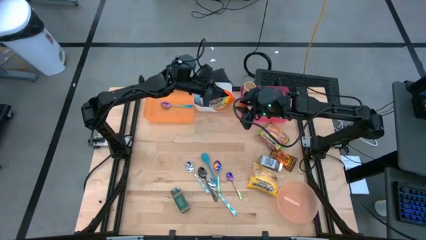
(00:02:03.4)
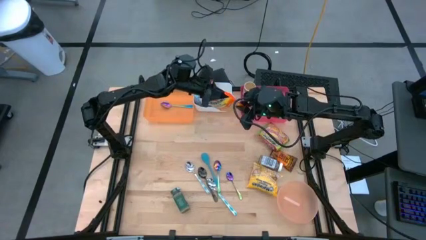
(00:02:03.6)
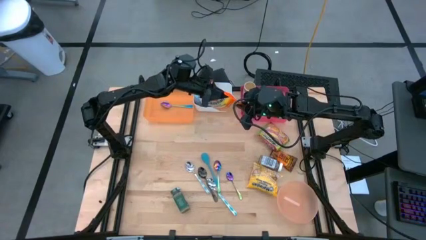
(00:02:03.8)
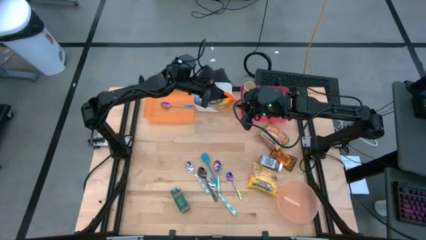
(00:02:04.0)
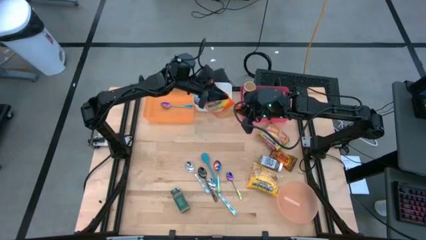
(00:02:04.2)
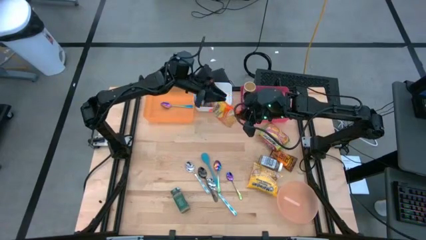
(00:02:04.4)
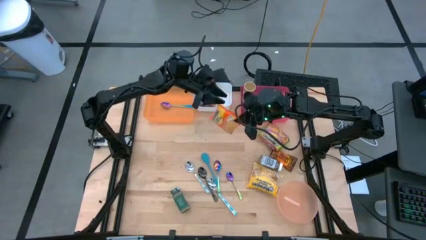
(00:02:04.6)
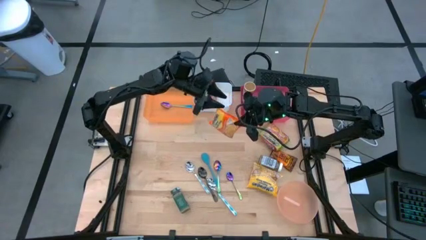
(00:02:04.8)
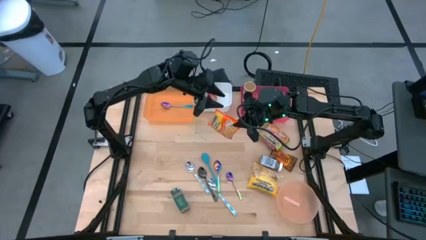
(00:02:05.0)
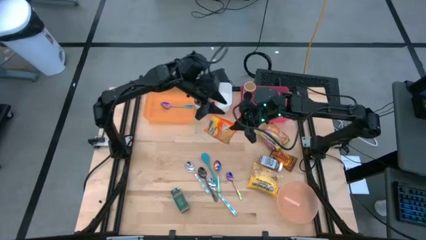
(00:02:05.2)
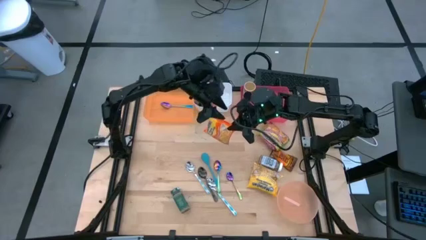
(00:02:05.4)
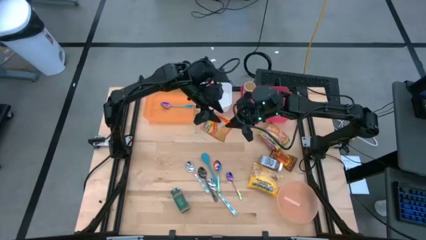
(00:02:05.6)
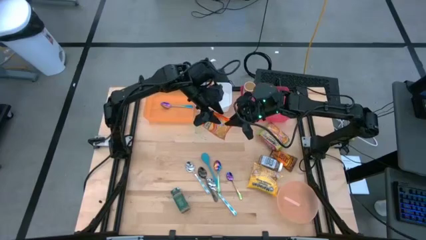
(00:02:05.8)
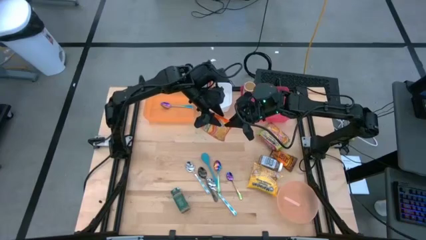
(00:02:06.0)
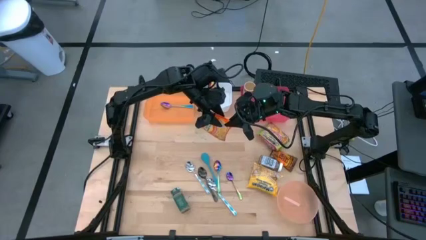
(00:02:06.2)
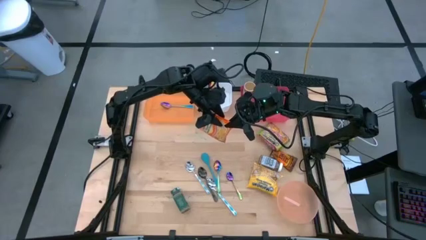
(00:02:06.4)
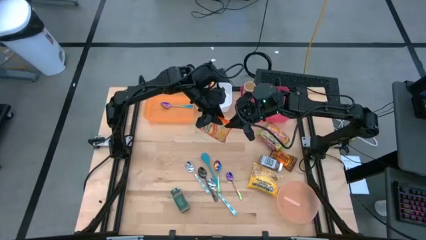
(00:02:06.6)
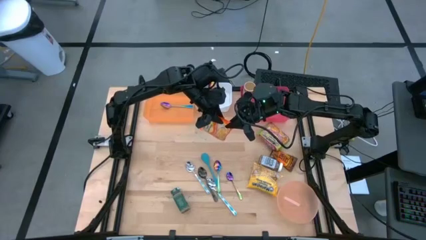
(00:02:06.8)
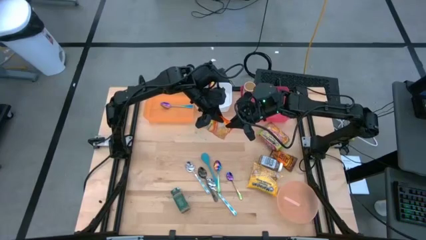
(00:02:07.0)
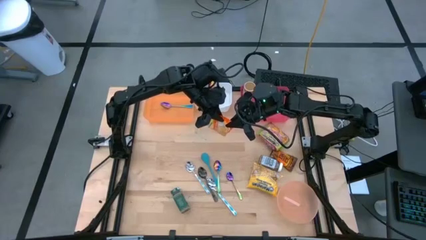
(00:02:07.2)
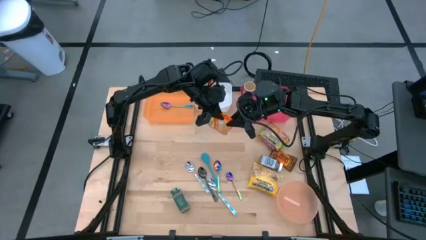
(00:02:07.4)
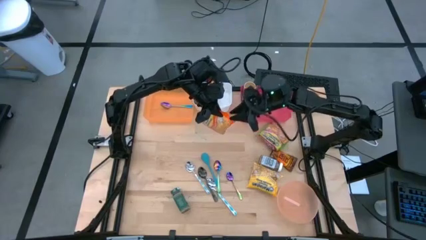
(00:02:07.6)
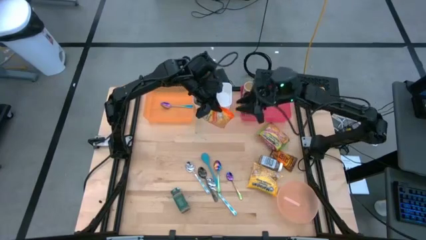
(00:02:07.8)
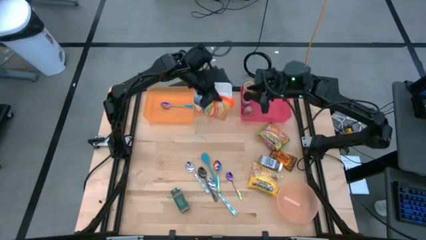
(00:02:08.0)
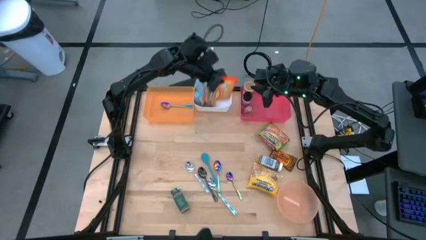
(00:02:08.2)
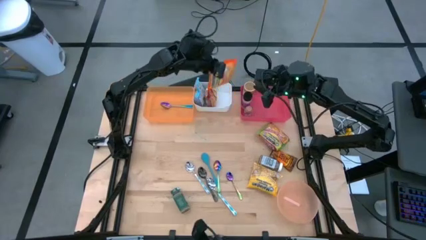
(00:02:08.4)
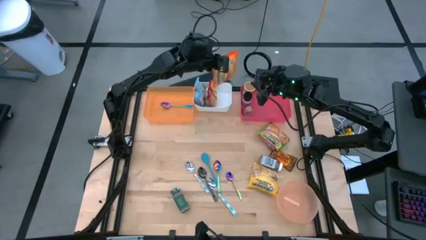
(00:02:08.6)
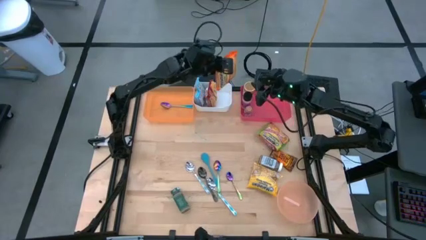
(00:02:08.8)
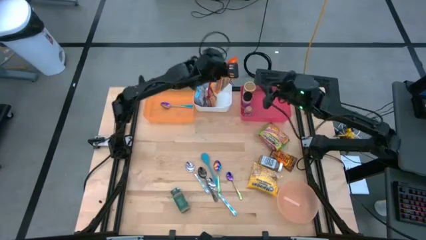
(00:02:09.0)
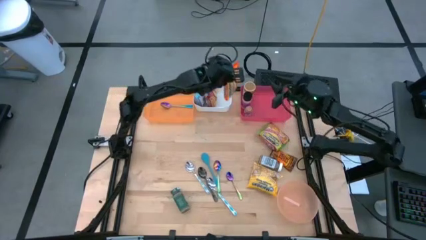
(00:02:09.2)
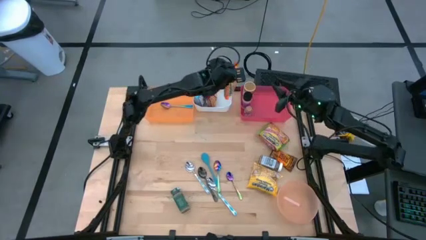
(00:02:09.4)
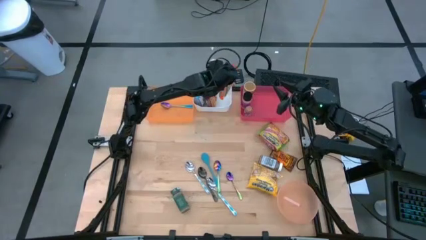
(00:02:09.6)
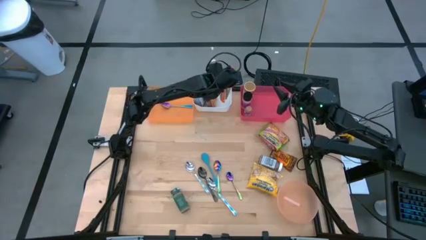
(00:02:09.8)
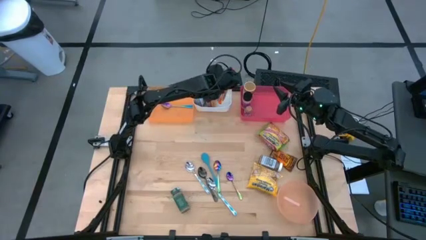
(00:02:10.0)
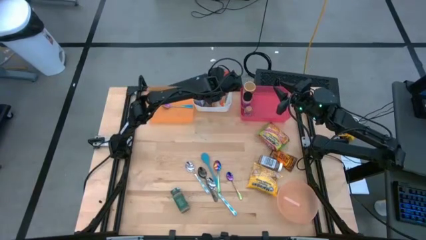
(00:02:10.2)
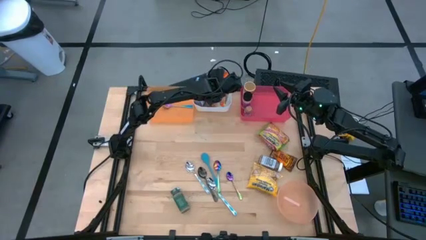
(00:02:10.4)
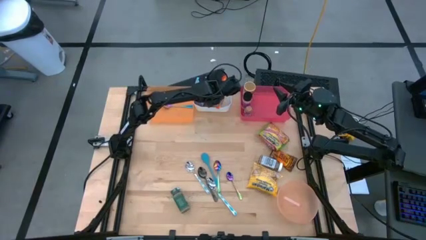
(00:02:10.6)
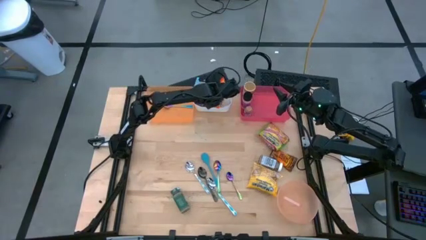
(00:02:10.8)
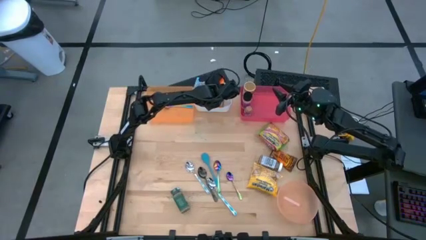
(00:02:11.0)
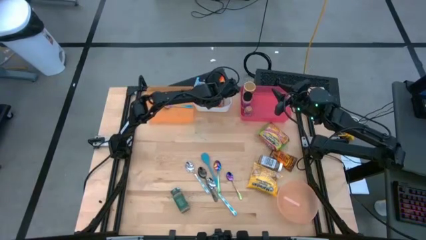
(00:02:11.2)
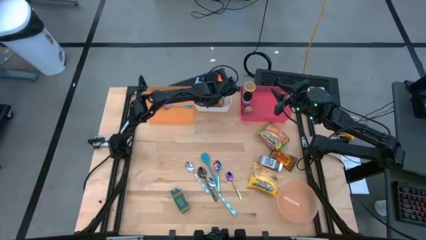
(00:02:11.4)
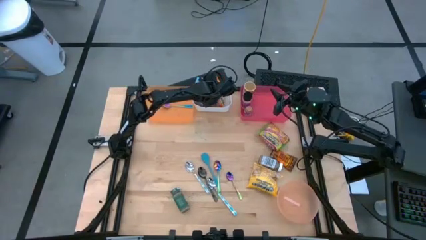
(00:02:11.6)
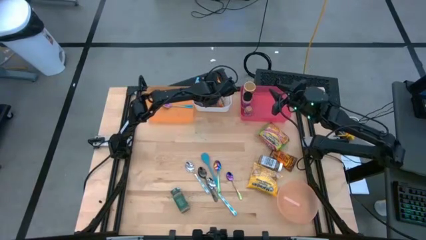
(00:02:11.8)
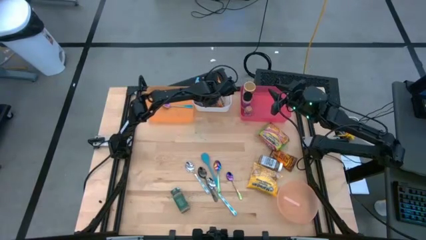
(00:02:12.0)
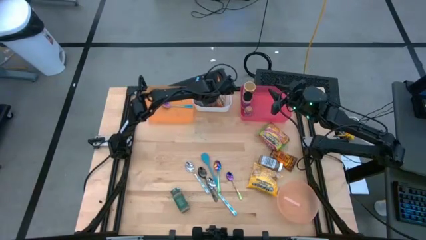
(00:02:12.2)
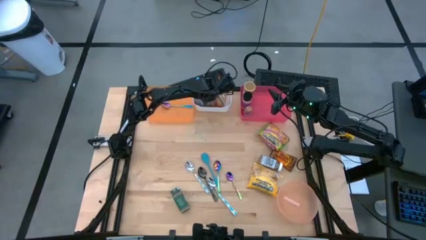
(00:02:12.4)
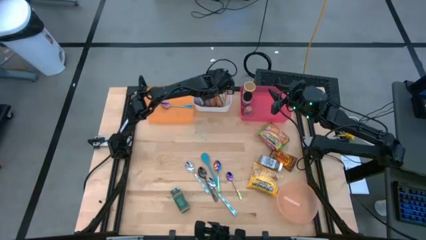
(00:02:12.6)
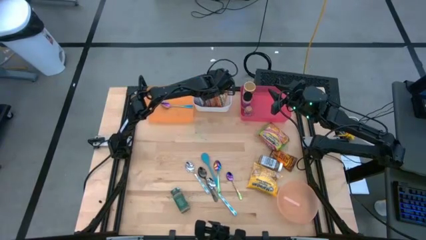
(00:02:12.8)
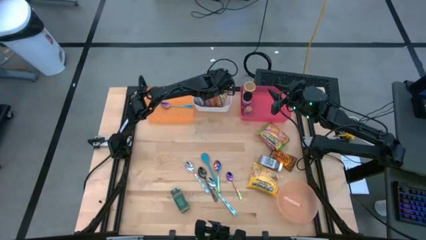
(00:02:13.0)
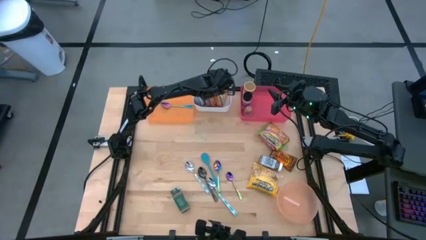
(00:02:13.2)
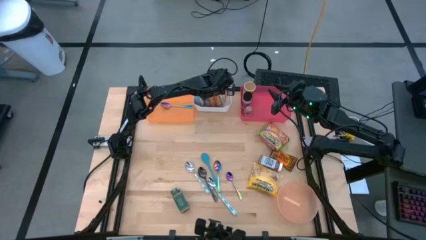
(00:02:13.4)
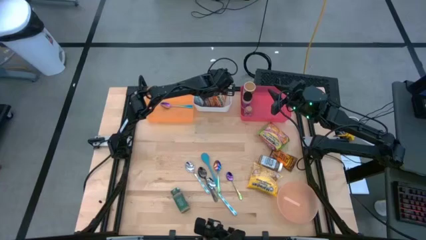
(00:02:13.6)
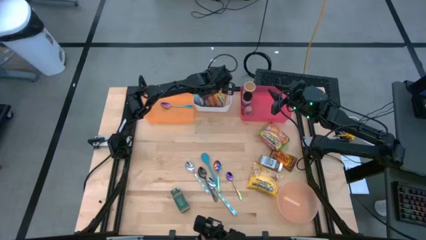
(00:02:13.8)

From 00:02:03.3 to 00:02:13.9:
Task: Pick & Place Food Item
Put the orange noodle pack into the white bin

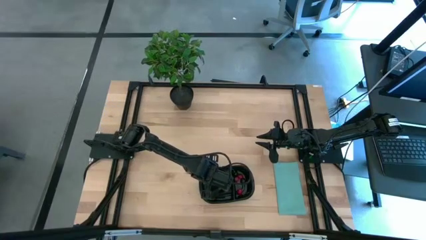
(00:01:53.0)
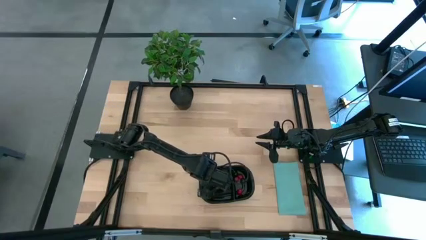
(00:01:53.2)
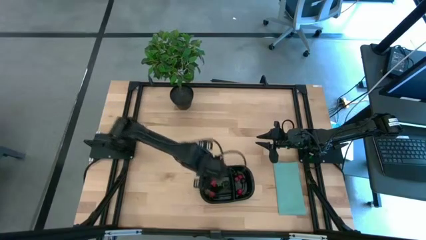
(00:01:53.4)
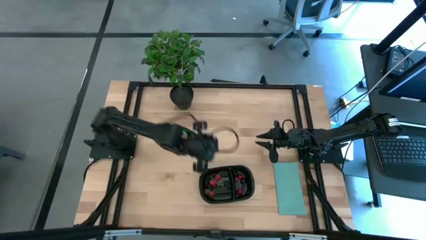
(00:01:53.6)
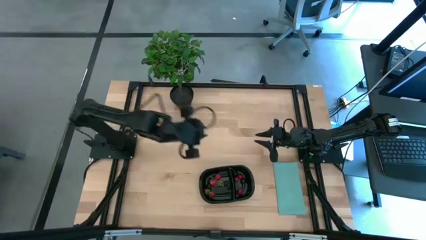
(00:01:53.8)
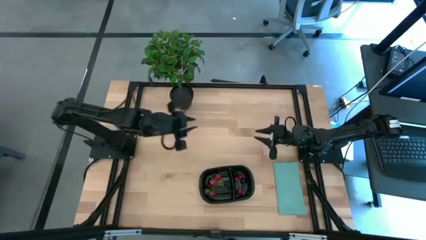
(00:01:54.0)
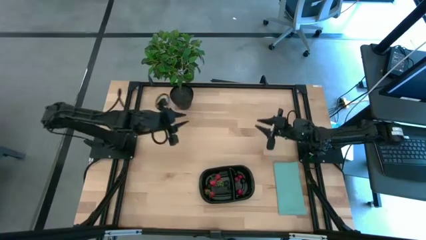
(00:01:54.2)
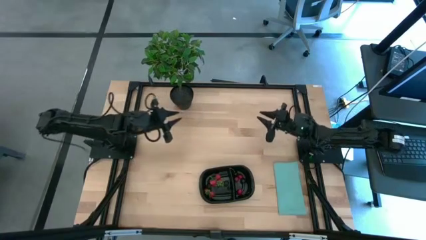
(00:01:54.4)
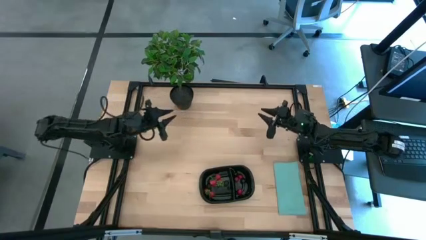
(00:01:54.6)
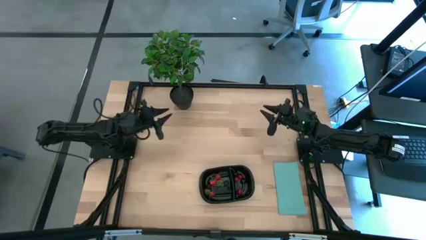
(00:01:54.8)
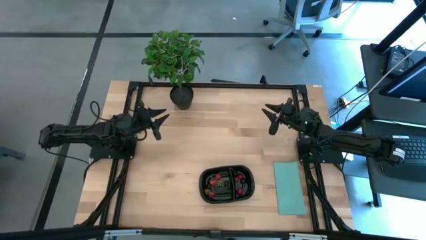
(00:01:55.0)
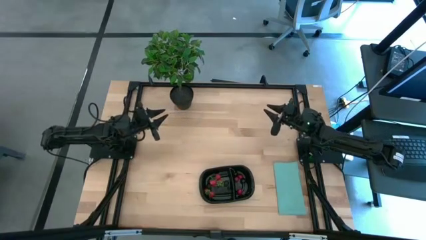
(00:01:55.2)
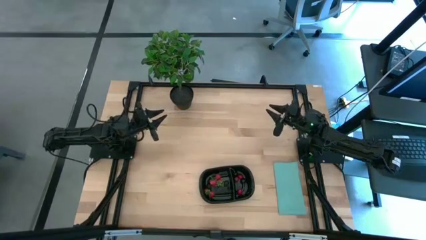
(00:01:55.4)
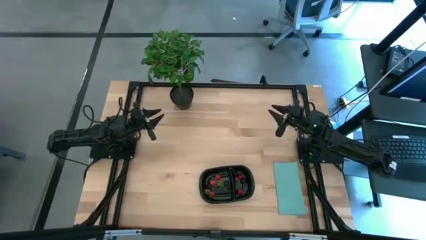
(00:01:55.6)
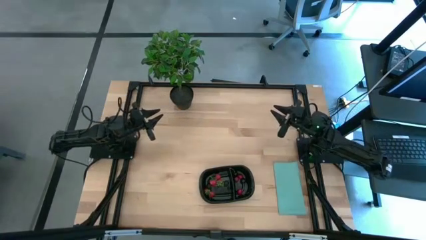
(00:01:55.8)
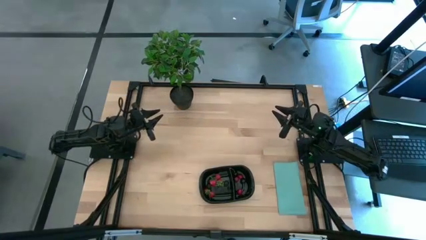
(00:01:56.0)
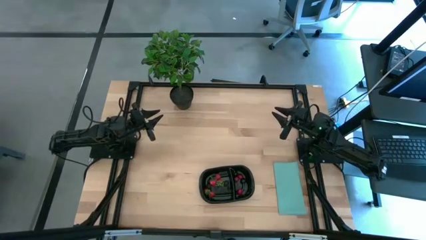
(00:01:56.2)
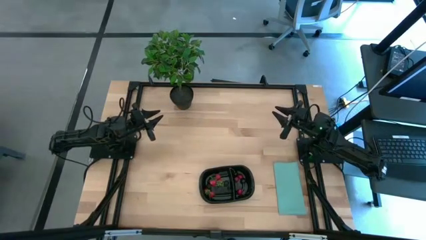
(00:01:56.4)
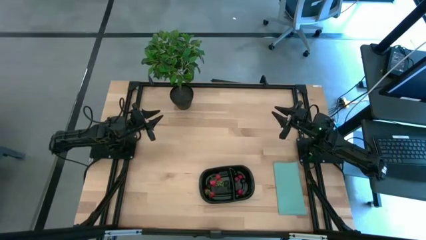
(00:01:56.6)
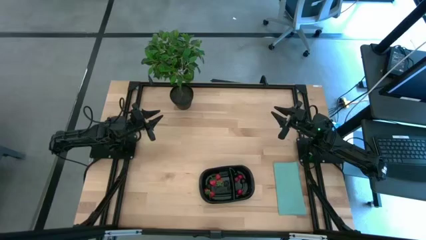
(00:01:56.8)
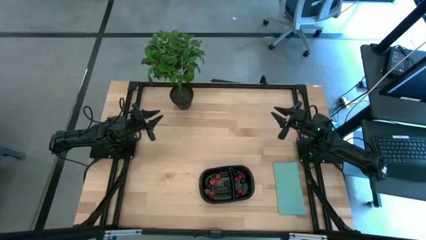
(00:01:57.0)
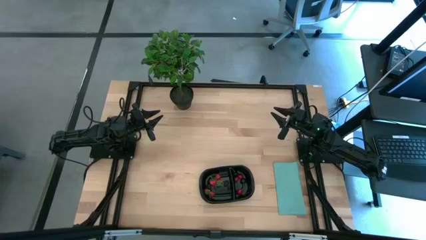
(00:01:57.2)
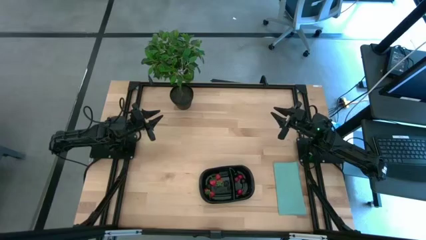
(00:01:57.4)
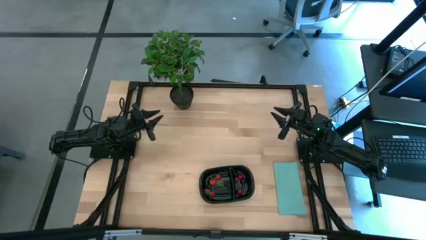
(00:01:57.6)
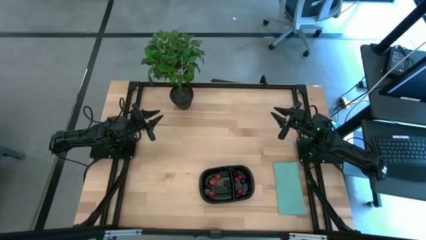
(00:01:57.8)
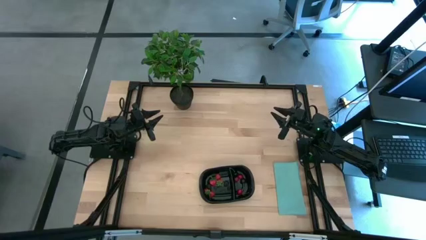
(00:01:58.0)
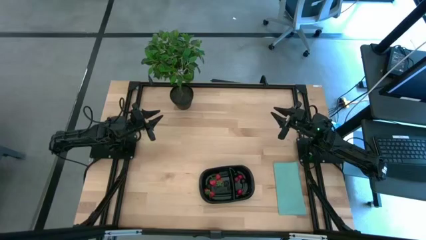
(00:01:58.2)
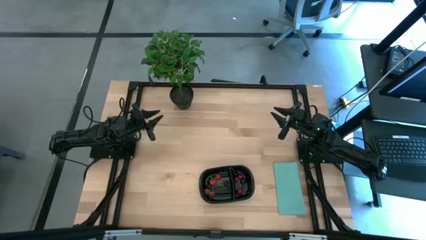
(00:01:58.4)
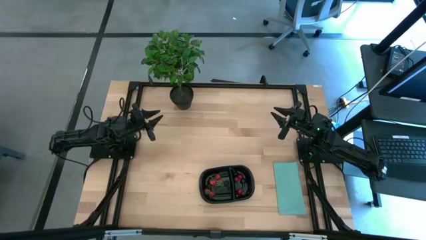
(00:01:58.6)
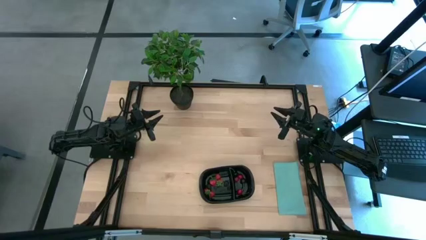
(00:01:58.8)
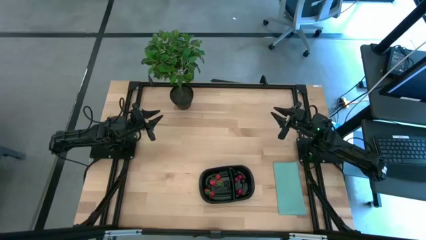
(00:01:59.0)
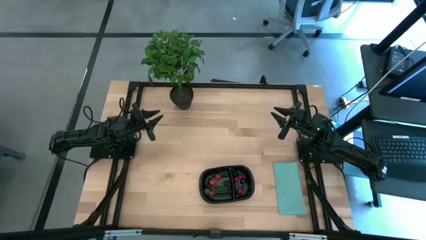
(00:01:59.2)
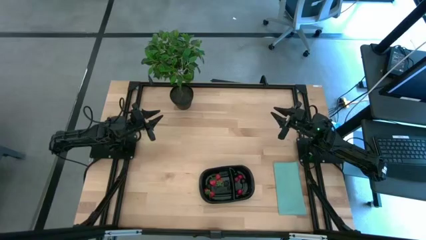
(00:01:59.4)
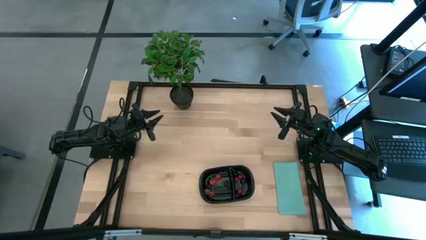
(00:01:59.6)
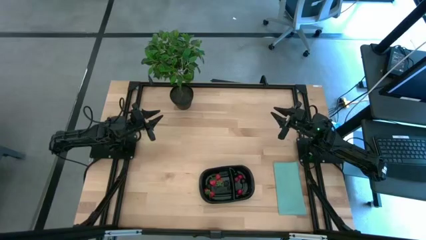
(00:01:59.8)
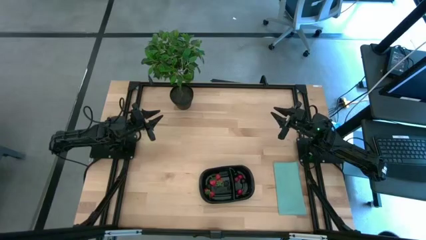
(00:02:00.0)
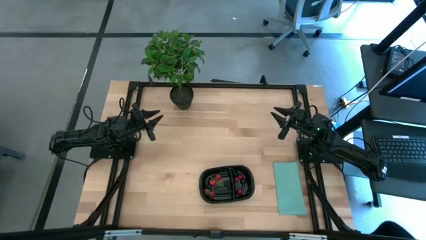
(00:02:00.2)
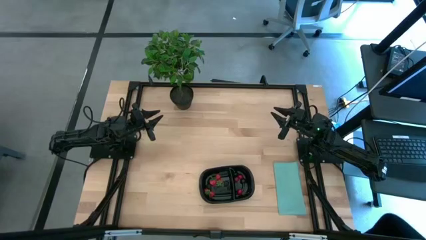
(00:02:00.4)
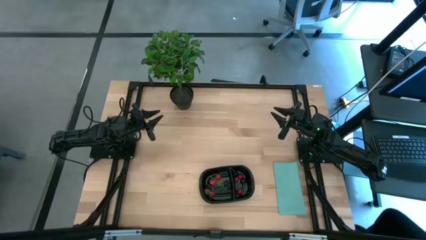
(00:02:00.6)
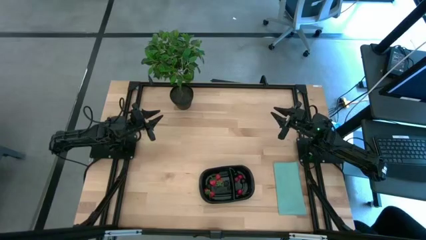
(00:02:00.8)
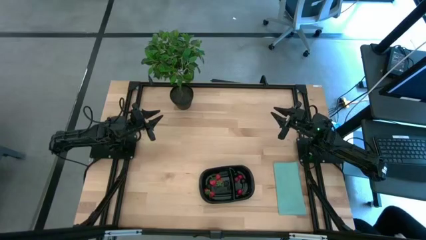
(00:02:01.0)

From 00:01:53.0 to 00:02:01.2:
Task: Pick and placing Produce into tupperware
Return to Home Position
